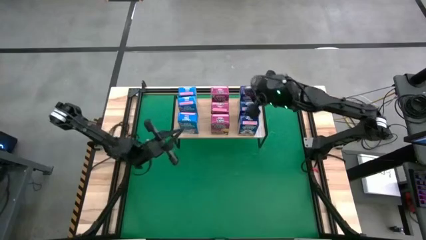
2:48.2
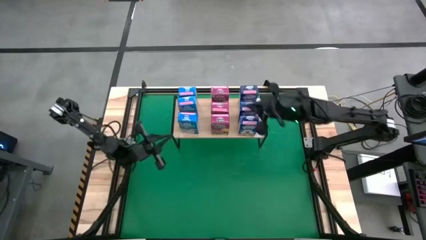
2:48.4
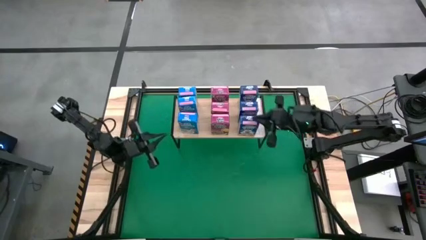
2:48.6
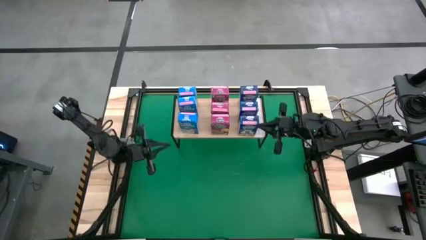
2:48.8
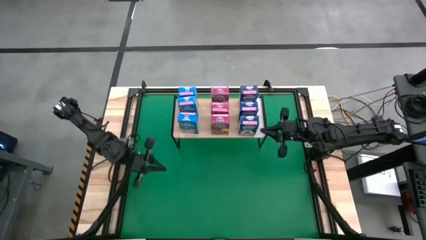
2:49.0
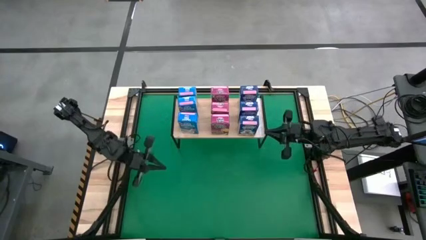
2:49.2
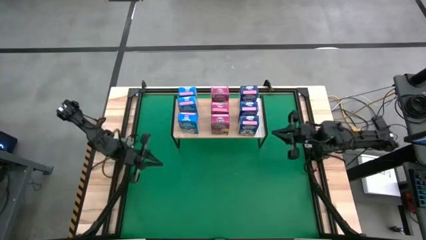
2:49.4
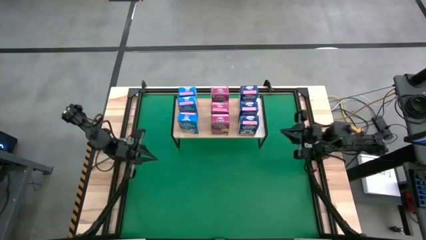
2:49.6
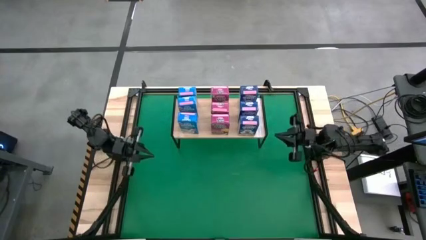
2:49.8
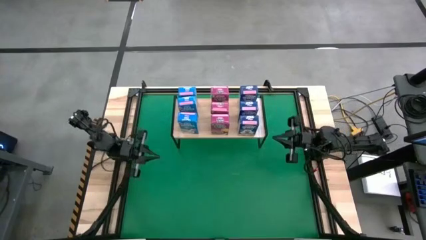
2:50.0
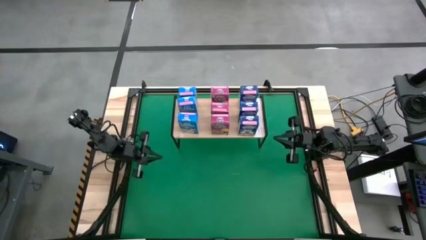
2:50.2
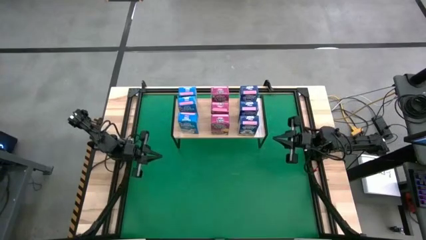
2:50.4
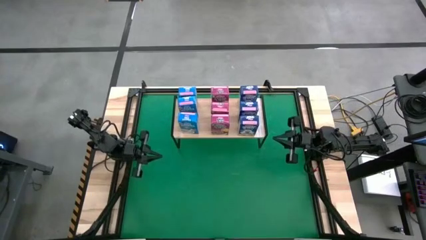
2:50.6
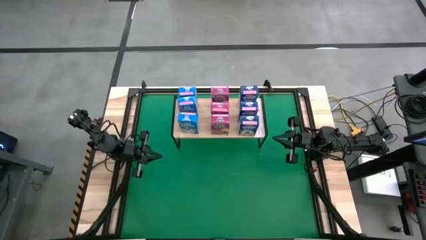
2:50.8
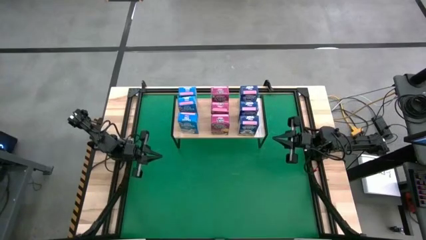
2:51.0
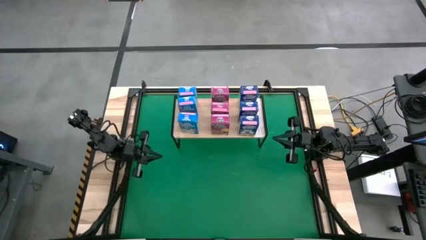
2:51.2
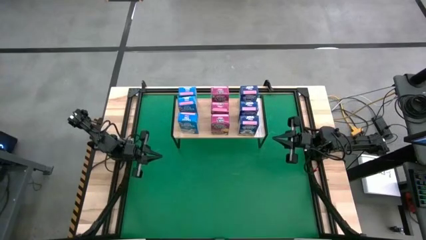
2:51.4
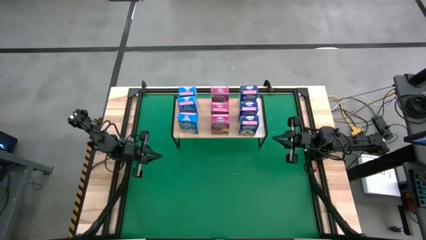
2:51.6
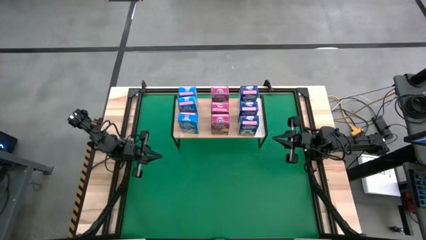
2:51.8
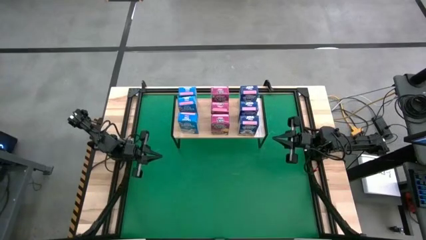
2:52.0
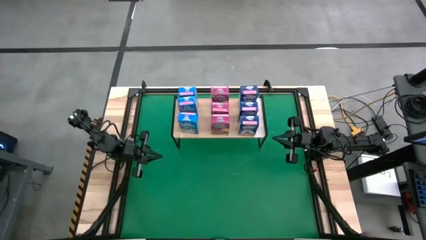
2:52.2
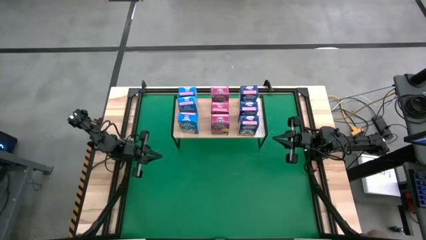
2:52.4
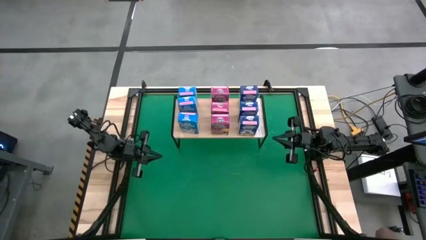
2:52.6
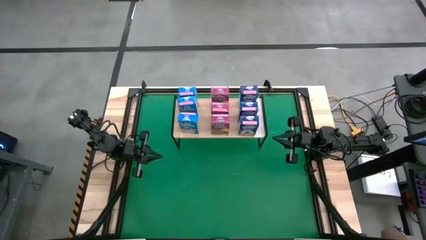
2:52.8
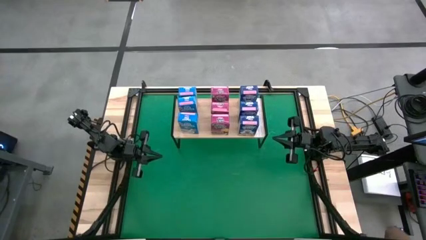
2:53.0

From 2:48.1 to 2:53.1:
Task: Stack cereal on shelf
Return to Home Position

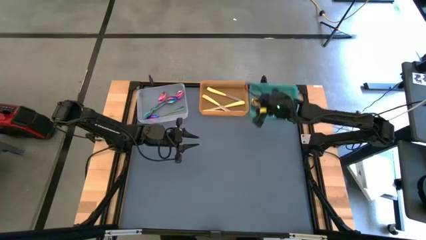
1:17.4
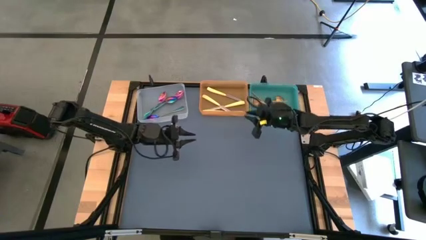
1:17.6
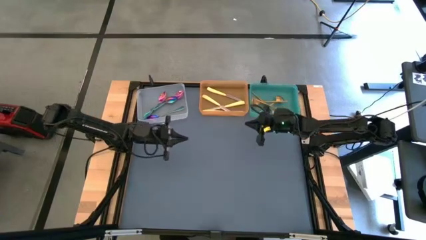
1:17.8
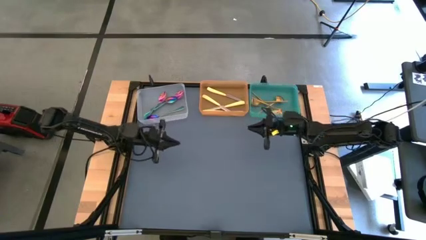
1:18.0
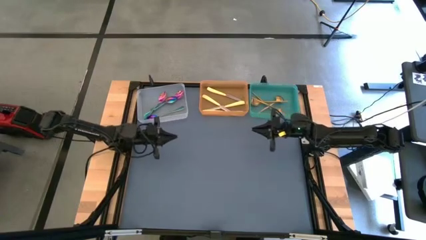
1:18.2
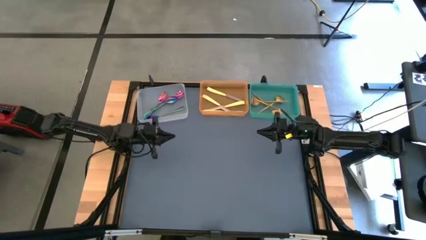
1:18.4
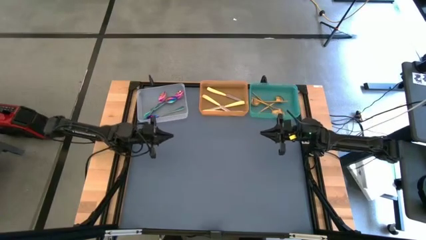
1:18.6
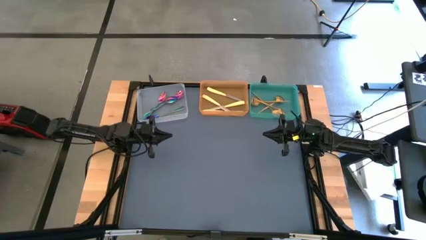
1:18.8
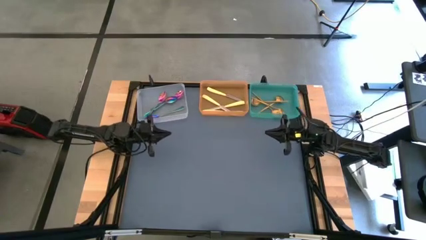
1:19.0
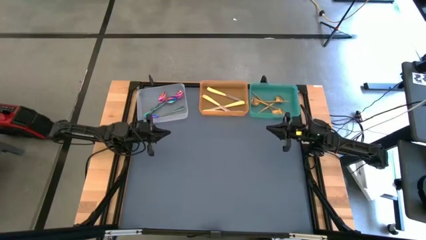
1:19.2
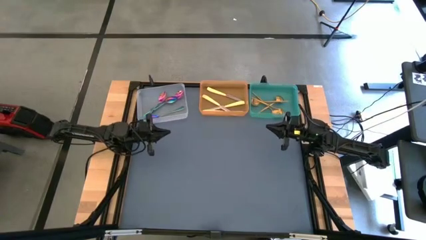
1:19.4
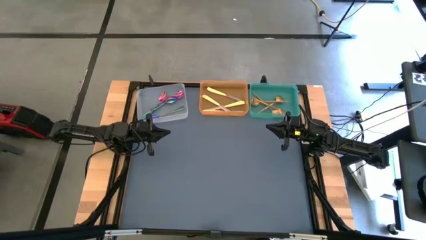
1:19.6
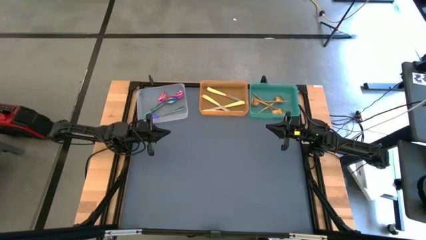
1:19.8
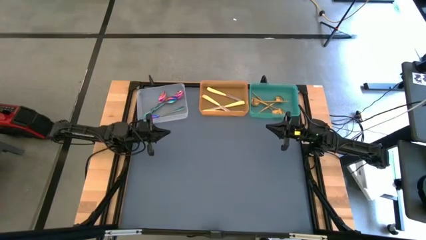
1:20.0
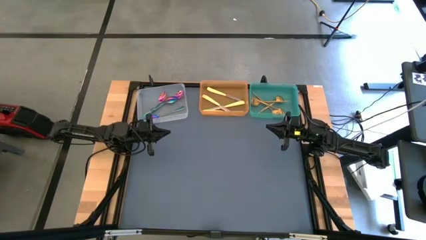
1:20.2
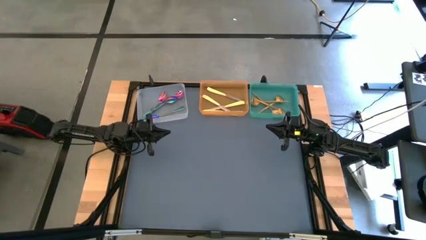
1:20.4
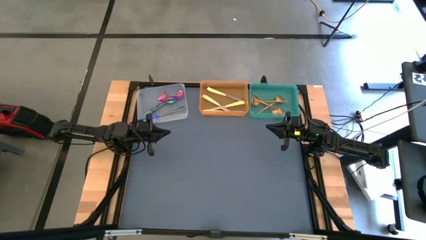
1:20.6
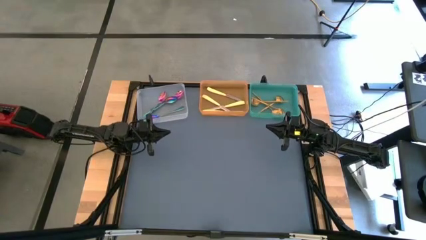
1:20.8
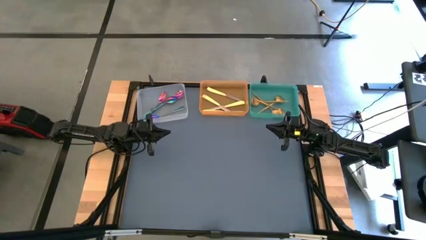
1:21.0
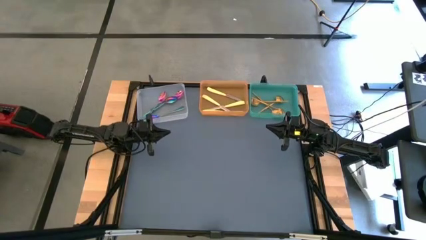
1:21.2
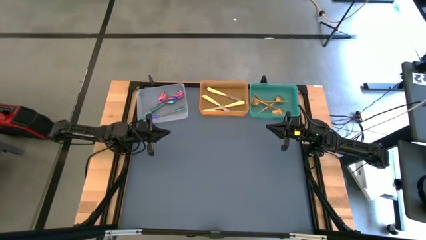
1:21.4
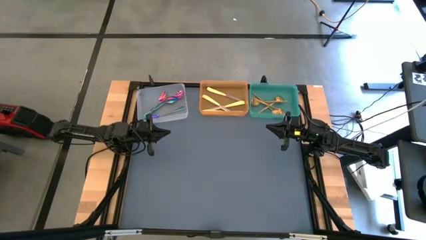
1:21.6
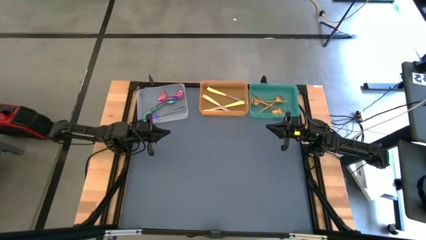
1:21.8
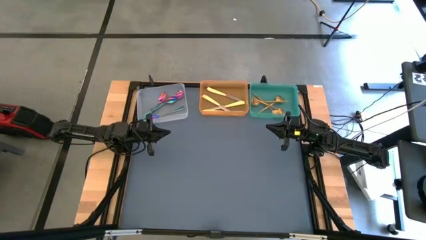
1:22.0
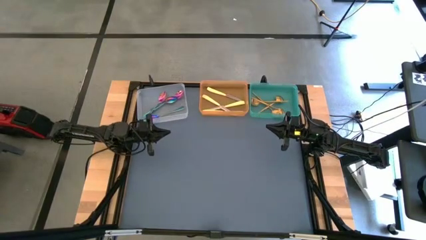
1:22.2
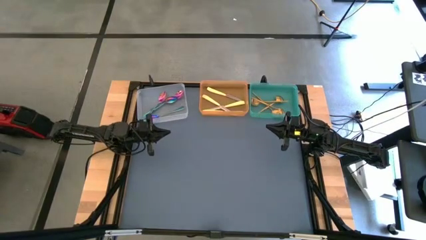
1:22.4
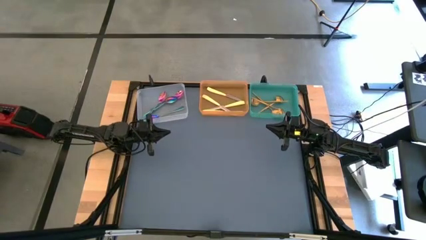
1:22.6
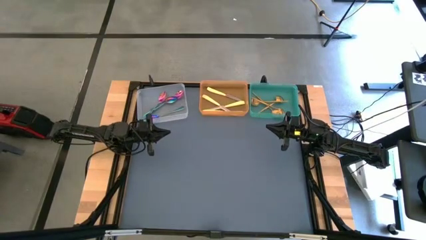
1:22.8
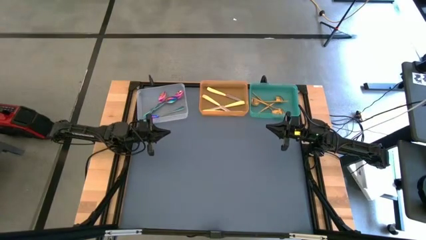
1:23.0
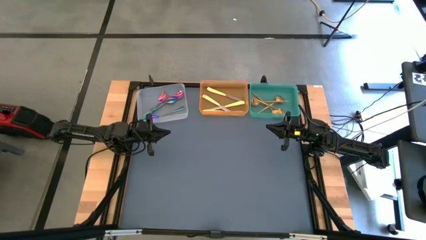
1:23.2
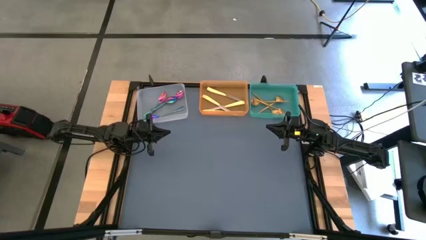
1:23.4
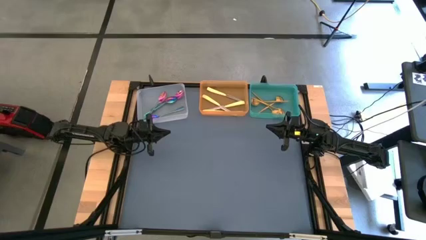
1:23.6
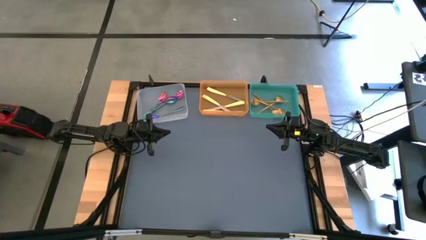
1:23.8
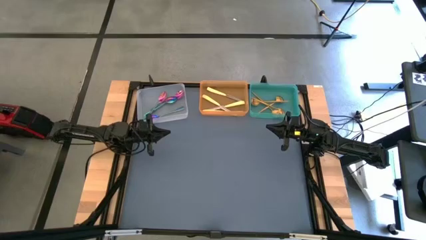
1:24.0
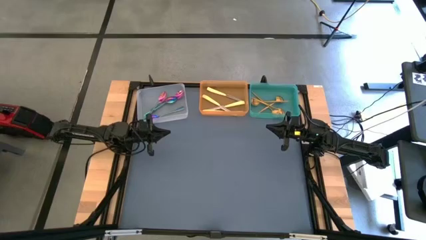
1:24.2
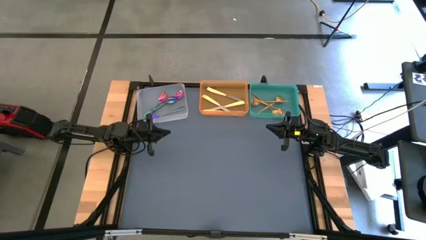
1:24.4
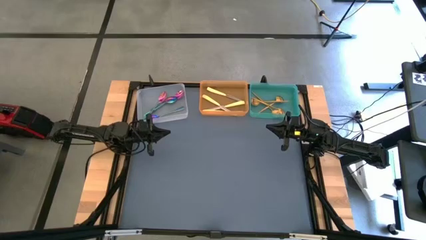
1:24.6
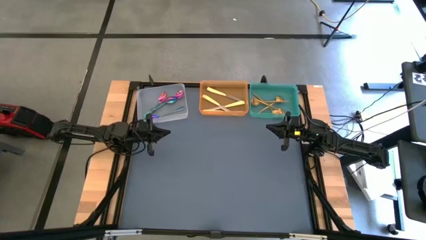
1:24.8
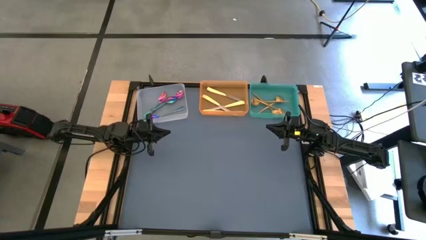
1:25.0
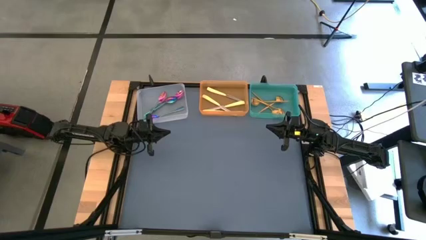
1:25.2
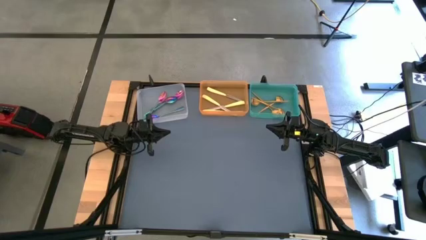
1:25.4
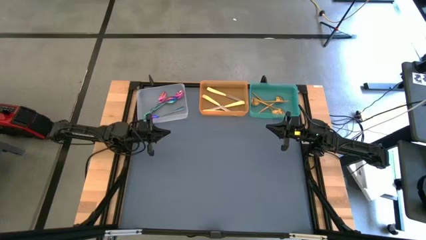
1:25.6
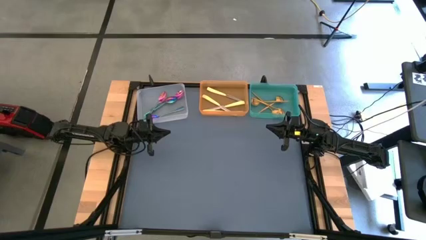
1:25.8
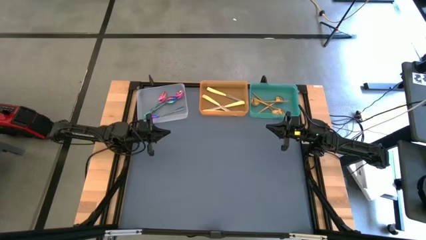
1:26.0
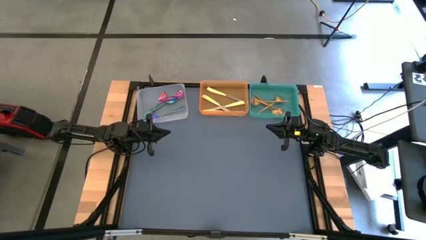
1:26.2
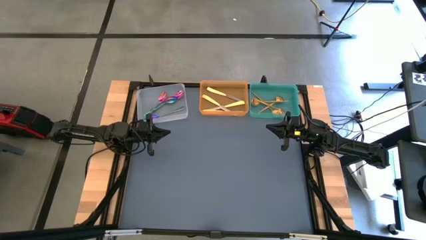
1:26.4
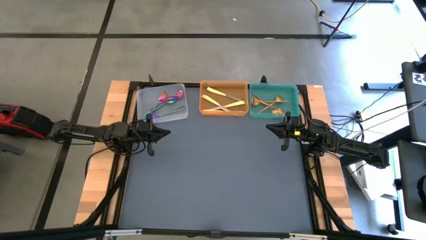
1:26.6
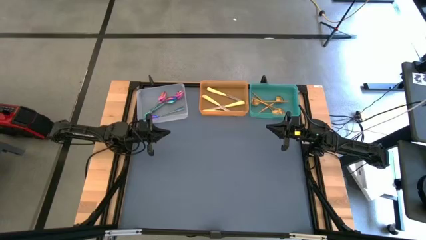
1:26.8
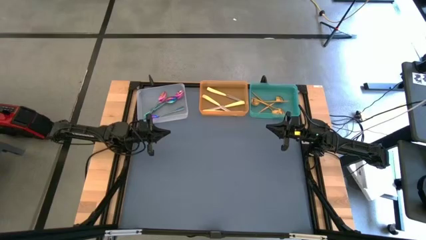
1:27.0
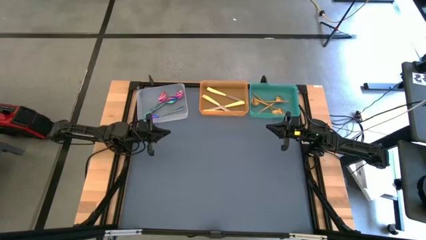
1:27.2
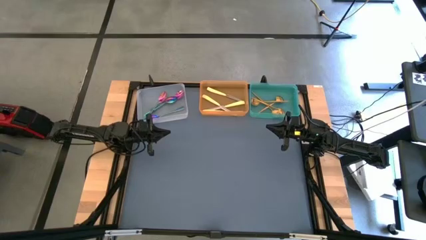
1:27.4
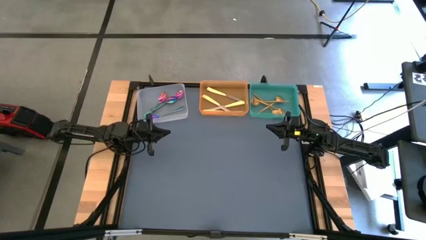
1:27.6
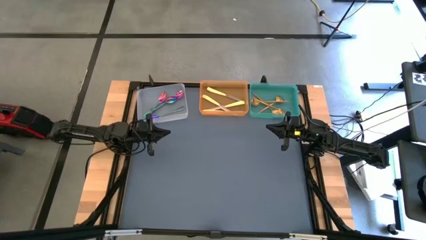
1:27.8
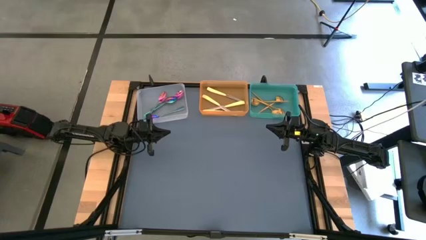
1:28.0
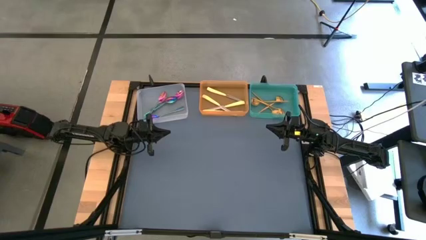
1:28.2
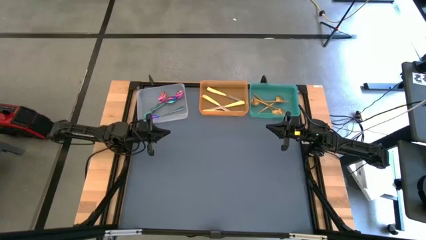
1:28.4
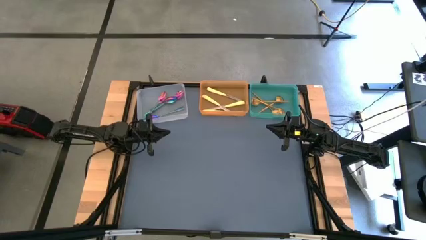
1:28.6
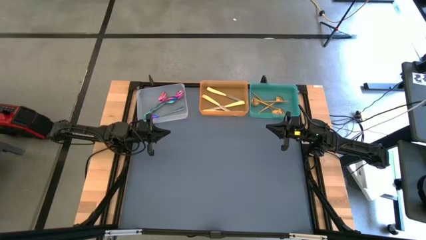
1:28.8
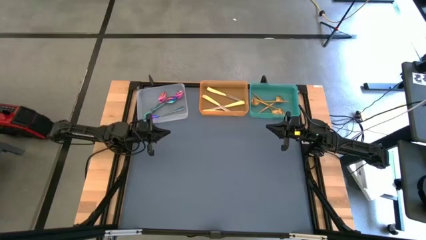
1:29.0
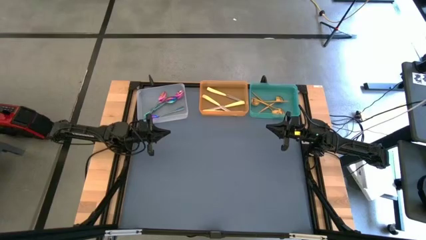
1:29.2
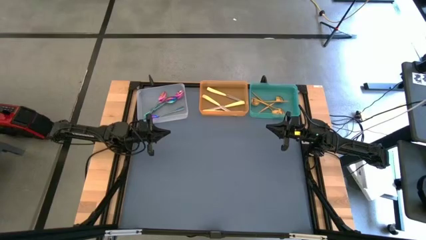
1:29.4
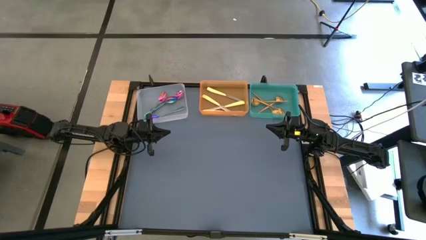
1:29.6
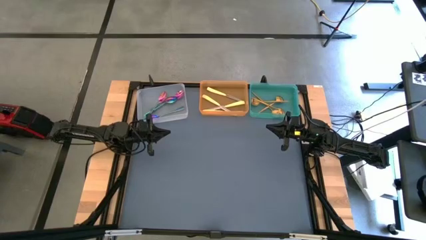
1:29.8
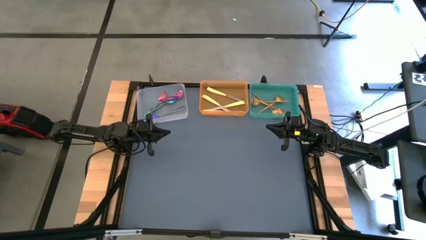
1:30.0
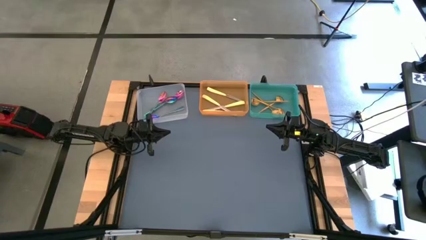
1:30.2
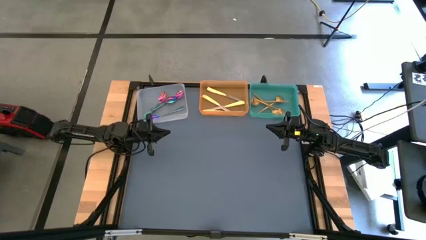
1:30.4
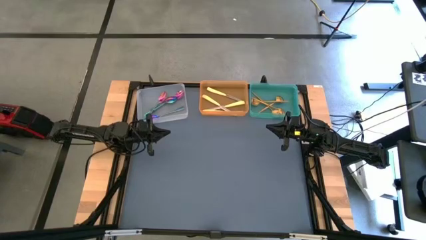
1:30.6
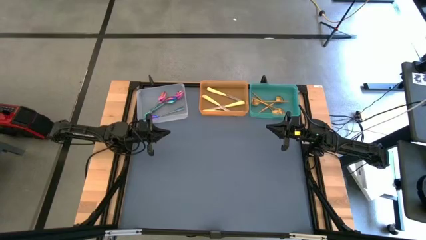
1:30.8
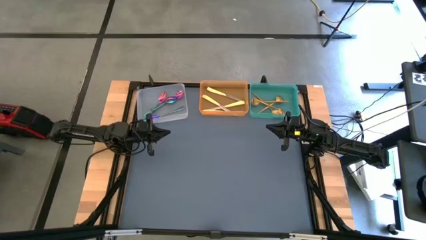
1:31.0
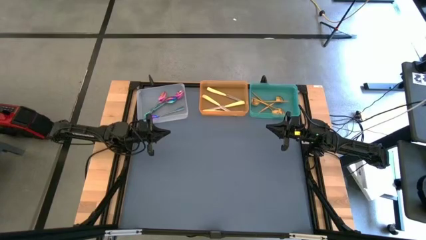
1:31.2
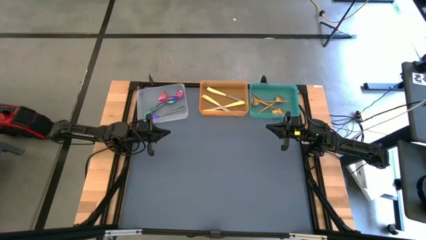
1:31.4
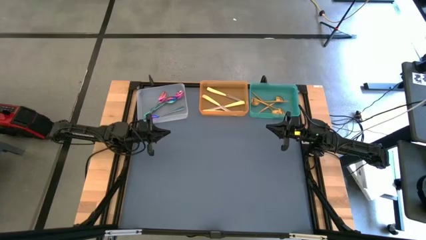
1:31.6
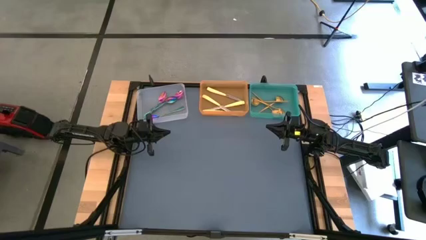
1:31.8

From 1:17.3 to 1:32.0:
Task: Sort silverware by color (type)
Return to Home Position
